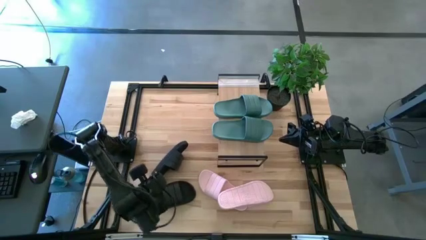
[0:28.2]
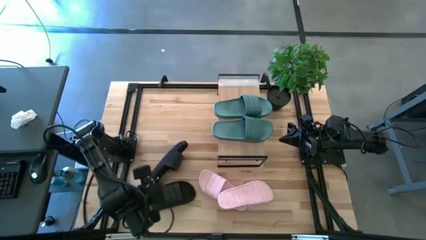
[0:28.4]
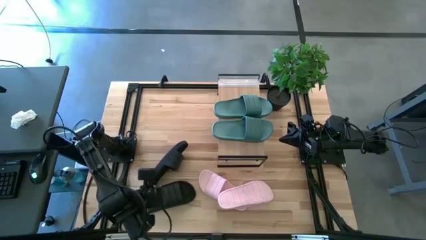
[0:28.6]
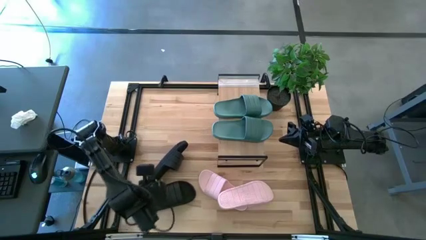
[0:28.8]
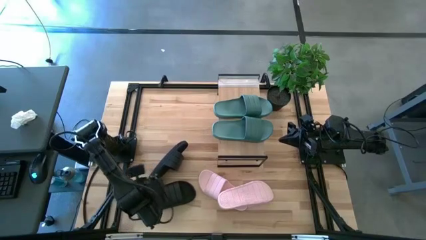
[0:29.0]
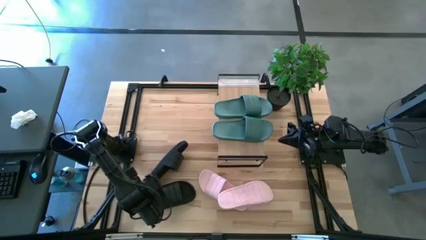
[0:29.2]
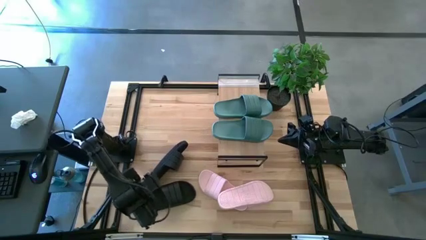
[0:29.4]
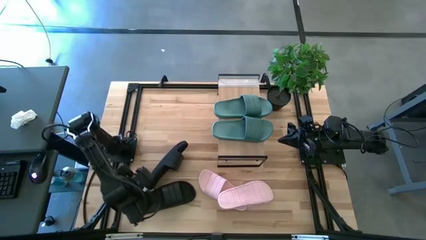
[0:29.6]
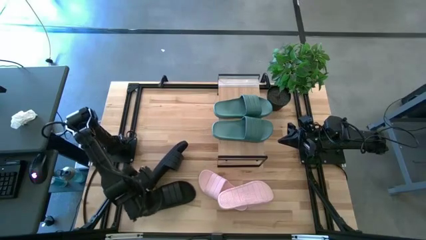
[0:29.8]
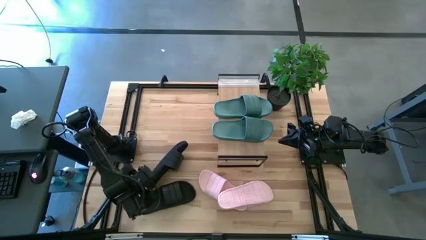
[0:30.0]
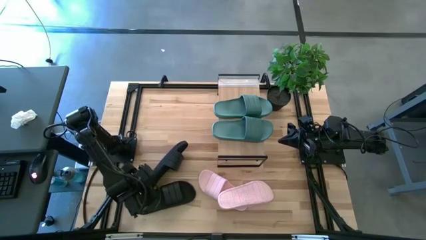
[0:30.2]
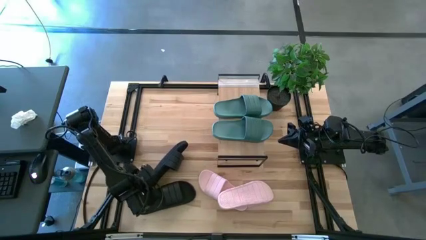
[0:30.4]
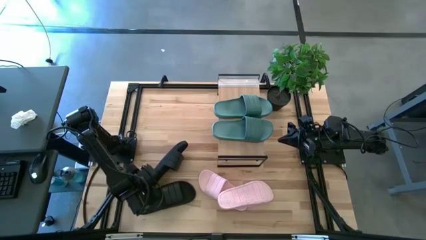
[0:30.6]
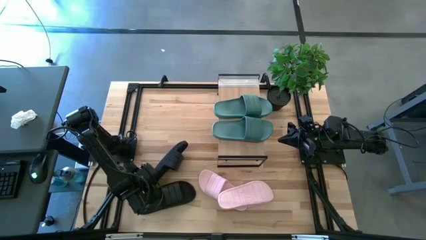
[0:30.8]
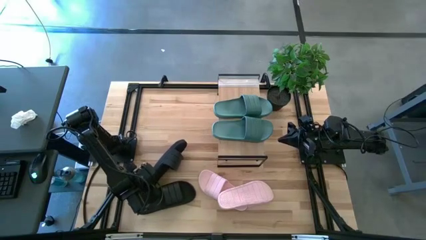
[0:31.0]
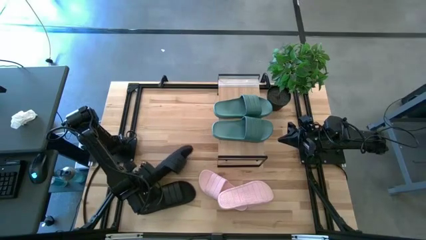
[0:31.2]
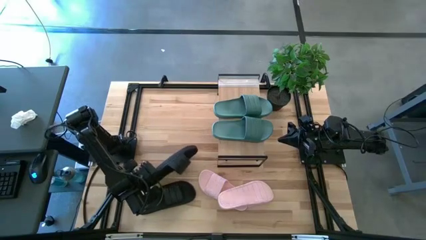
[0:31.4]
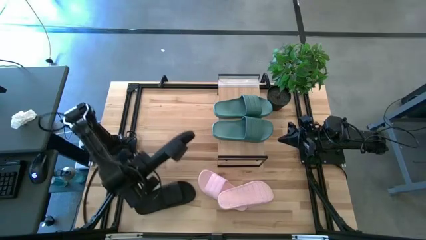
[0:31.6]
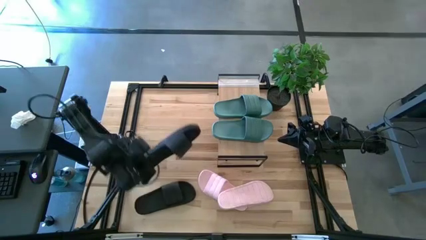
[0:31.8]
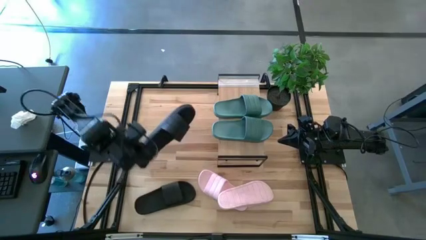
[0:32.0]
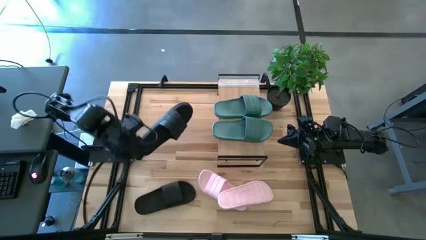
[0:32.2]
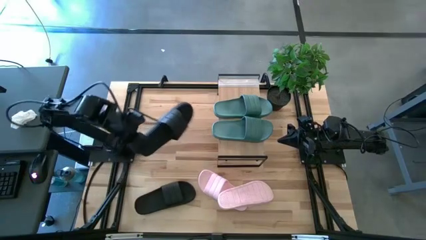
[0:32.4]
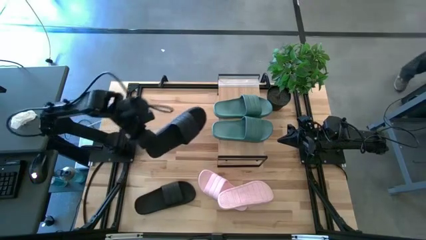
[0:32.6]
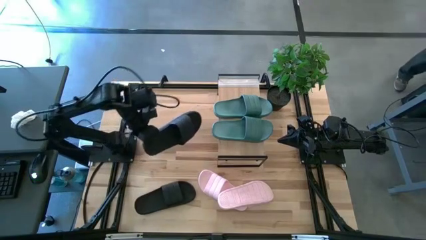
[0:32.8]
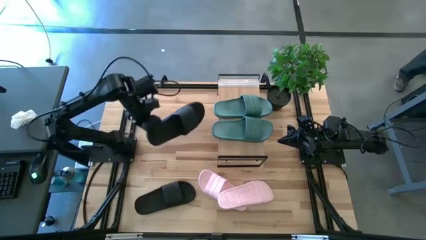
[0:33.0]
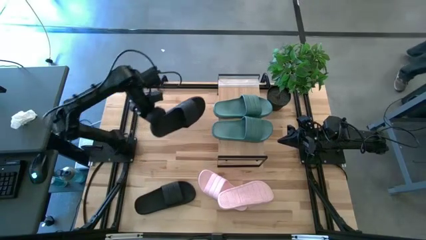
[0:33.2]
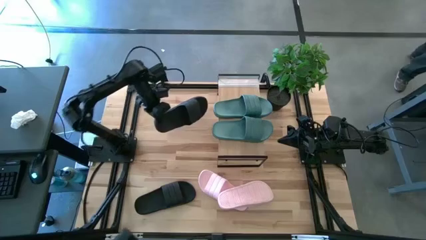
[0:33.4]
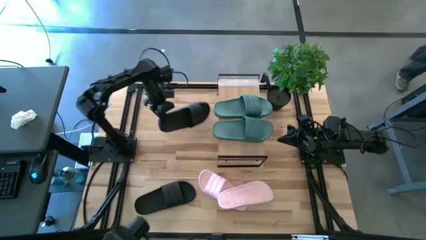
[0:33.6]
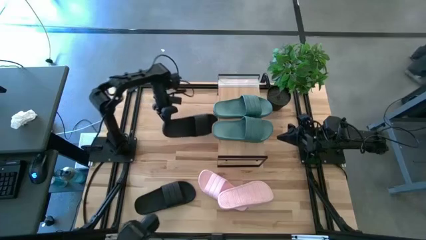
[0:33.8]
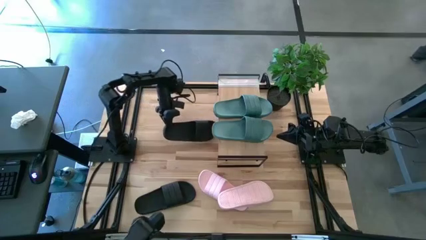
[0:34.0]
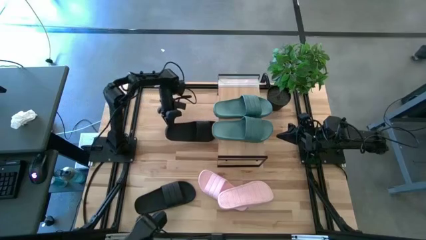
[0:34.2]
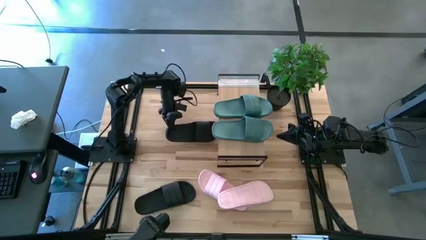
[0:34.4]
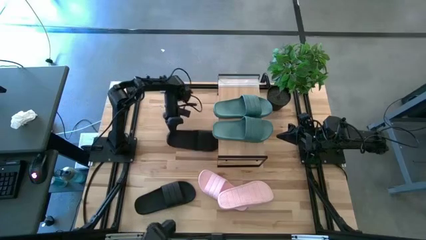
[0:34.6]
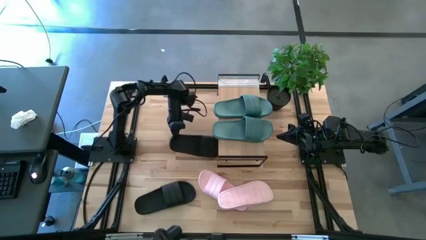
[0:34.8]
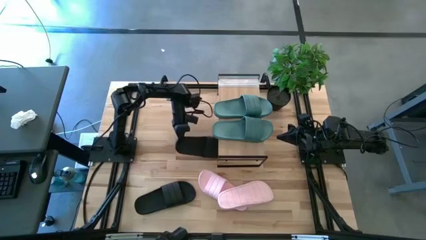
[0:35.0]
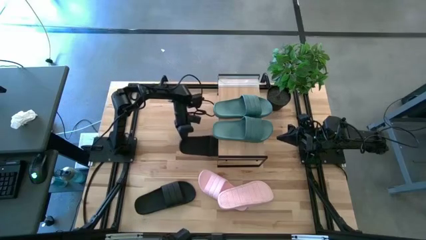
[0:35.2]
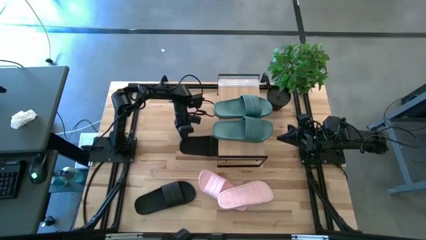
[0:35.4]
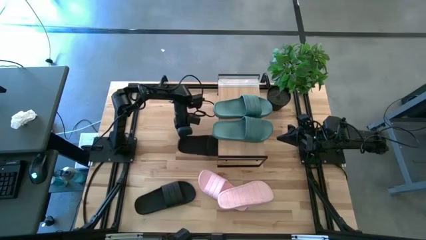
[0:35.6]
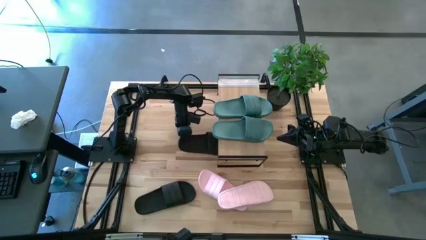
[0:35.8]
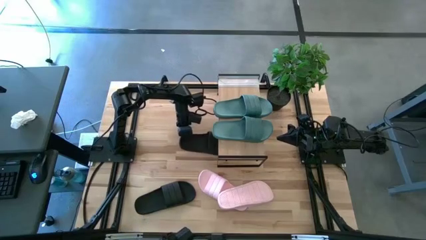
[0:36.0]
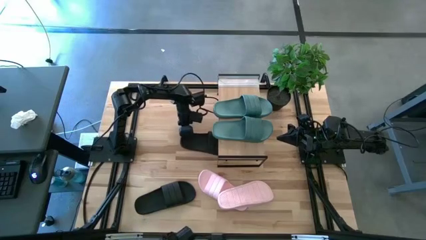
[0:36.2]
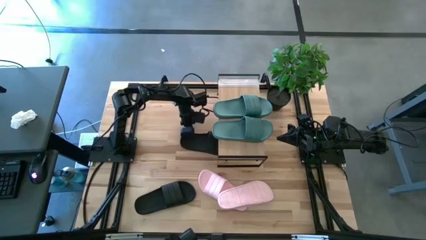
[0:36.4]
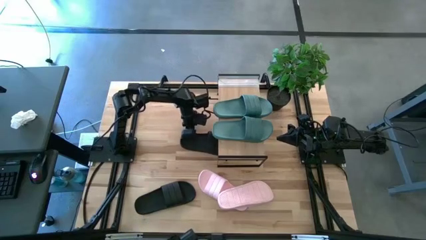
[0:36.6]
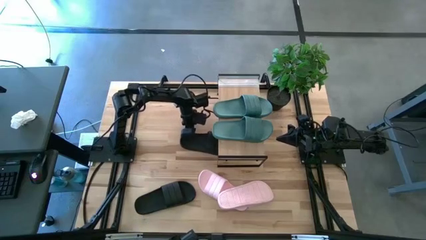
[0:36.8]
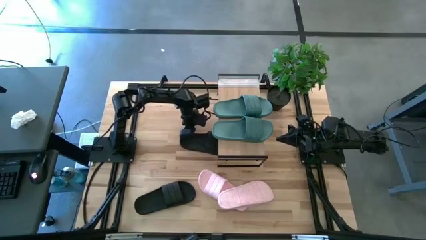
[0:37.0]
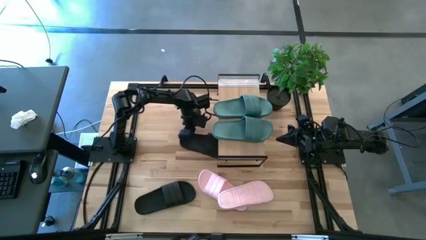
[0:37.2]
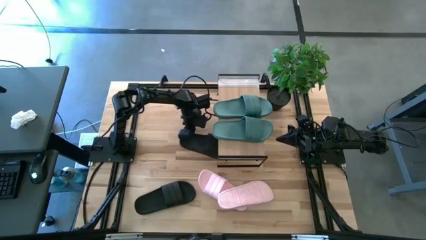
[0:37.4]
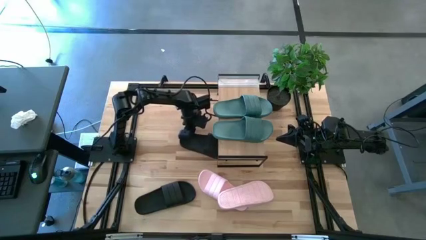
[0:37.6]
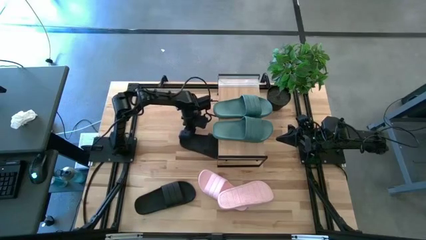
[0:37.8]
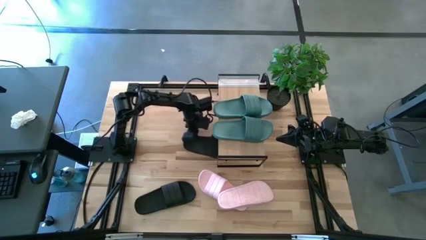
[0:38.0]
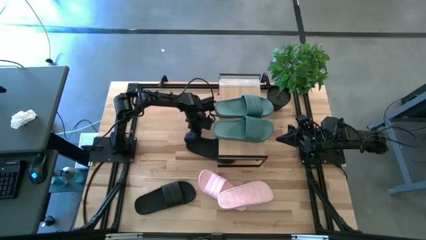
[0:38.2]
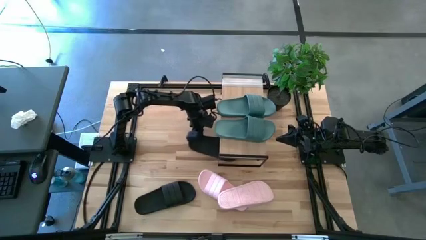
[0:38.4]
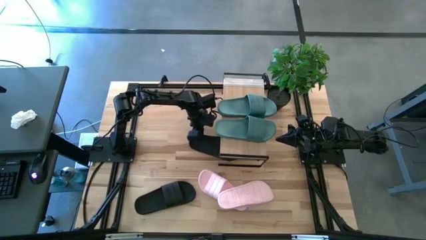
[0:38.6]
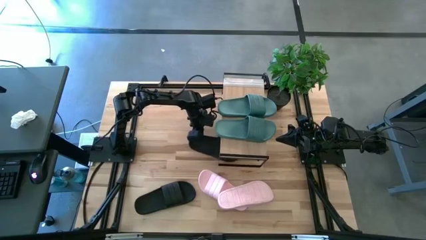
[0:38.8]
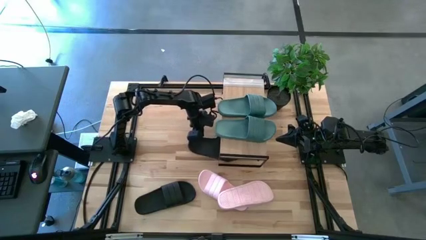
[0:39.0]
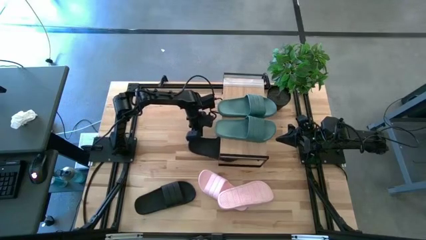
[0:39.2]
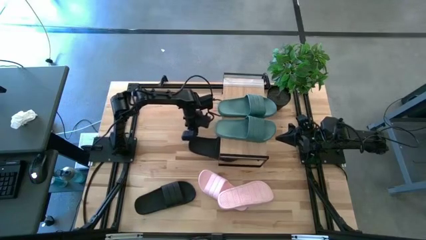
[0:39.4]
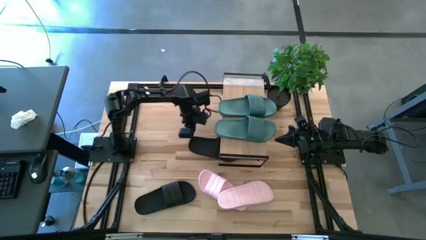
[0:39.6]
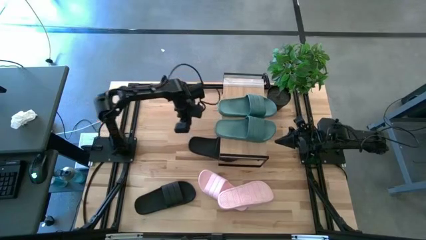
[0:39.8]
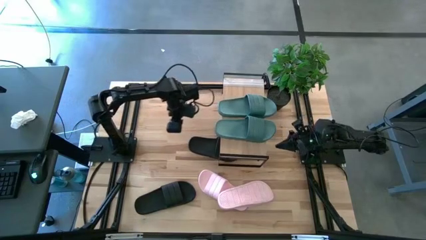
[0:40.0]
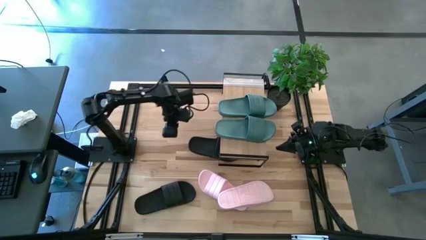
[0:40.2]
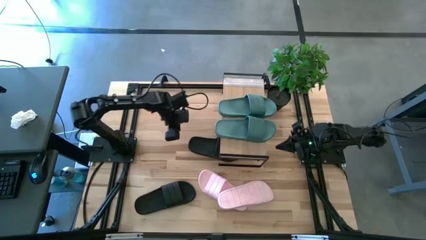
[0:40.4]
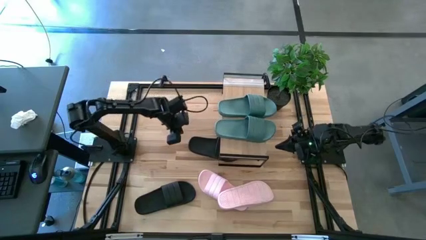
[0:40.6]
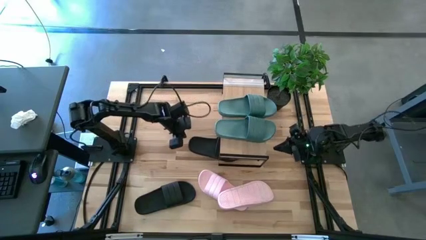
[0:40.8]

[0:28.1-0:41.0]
Task: Pick and place slides into the shelf
Put the top black slipper under the shelf
